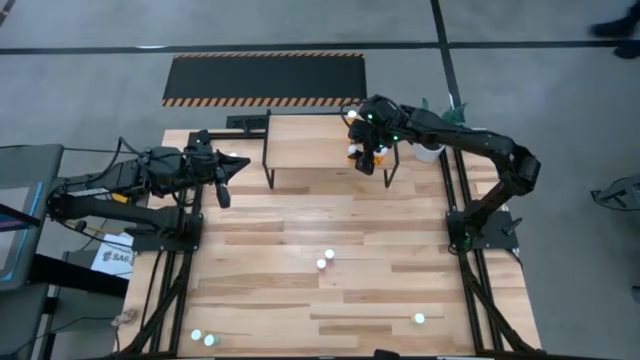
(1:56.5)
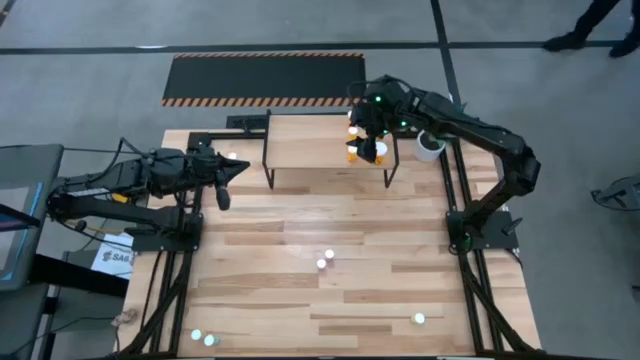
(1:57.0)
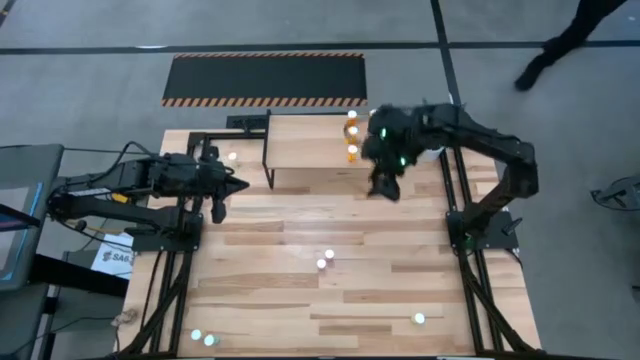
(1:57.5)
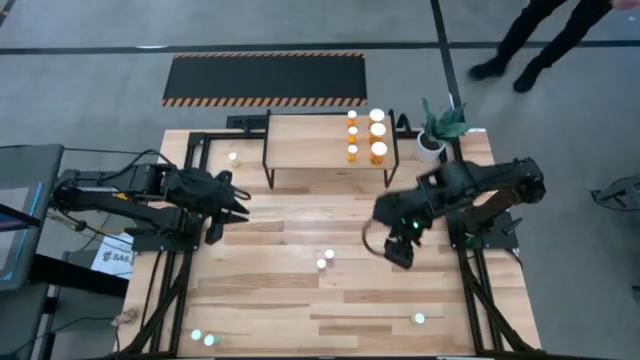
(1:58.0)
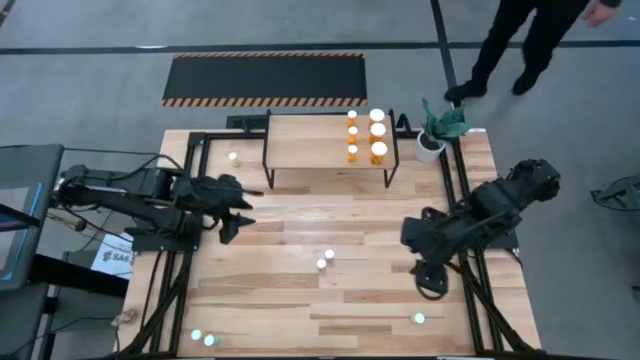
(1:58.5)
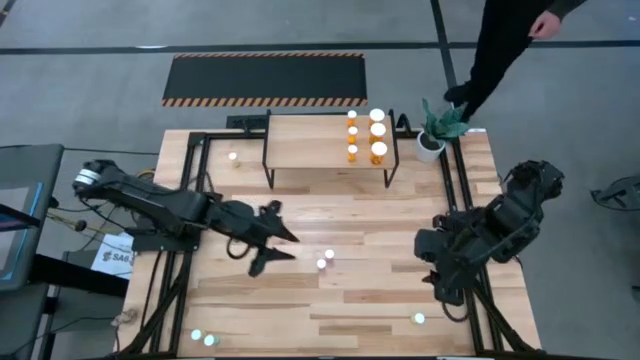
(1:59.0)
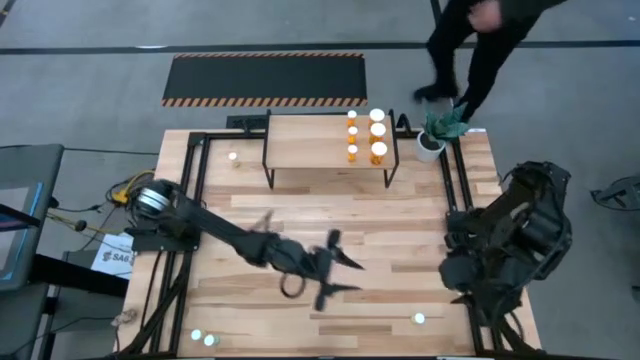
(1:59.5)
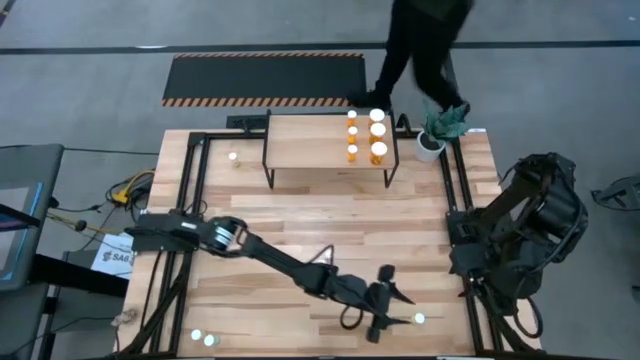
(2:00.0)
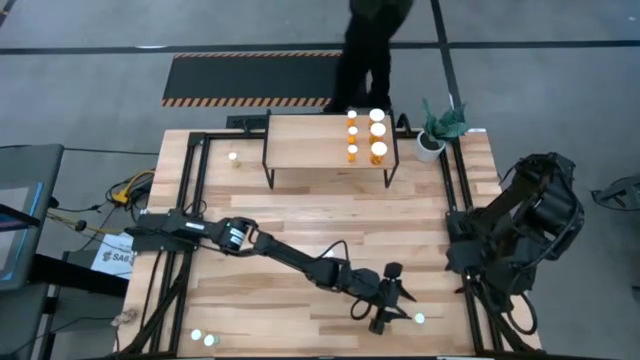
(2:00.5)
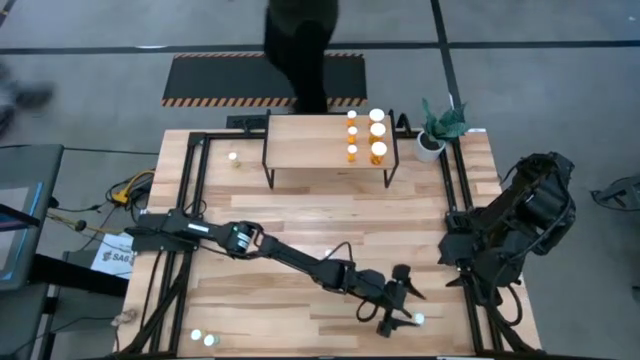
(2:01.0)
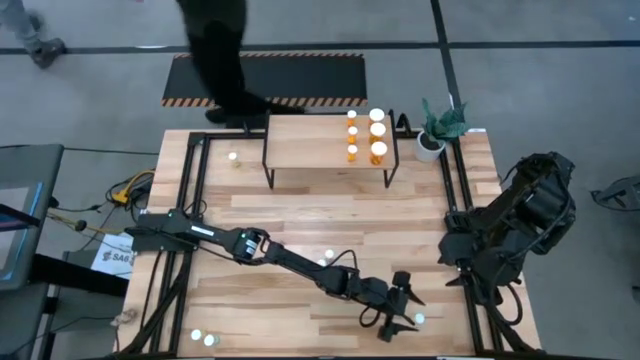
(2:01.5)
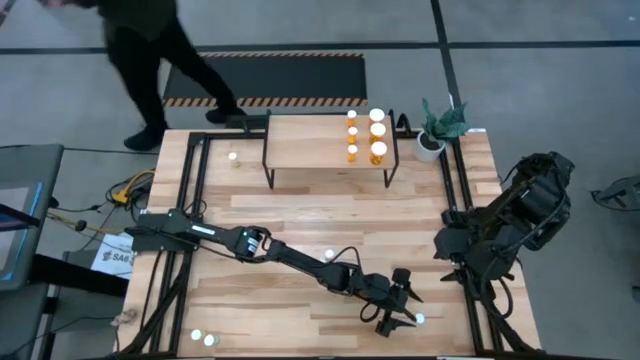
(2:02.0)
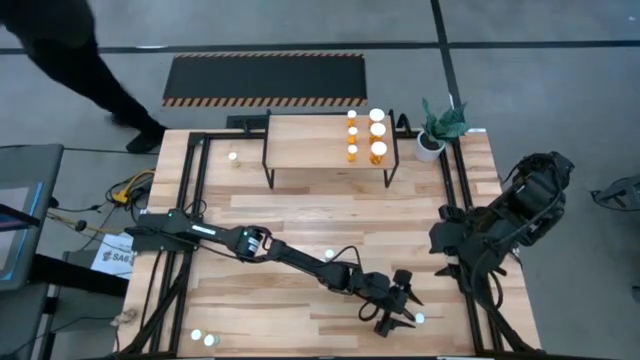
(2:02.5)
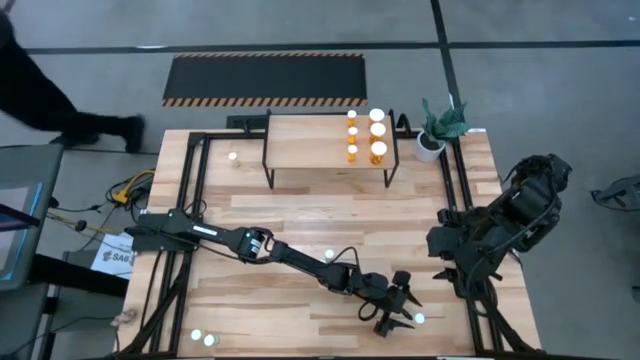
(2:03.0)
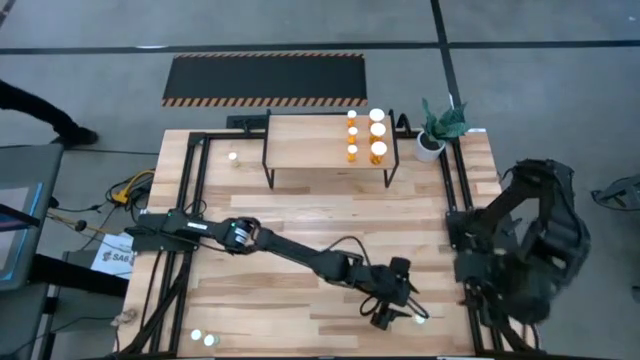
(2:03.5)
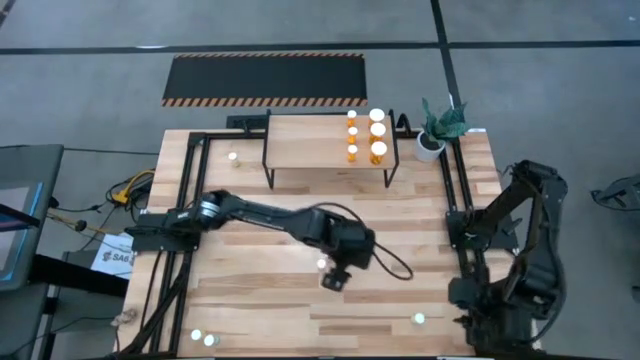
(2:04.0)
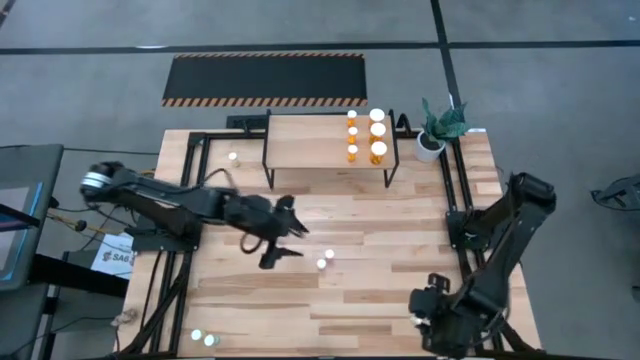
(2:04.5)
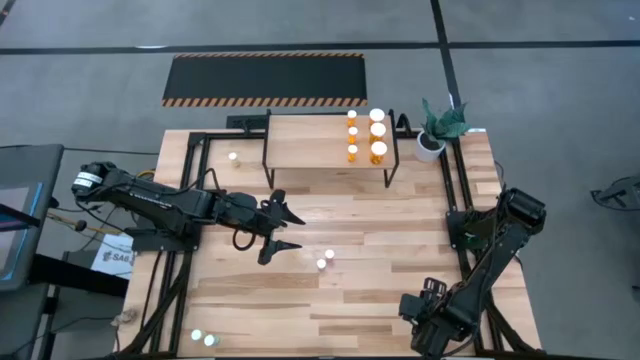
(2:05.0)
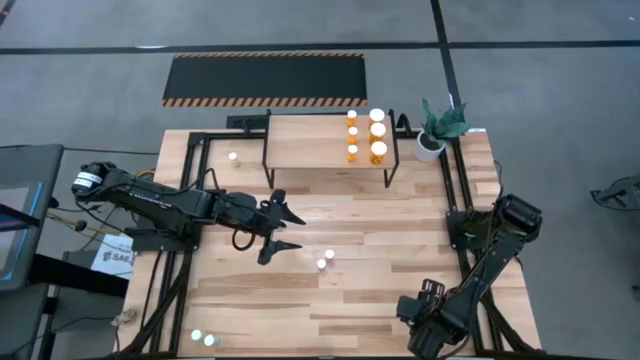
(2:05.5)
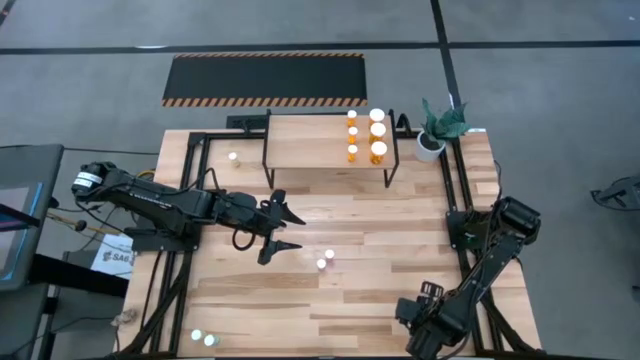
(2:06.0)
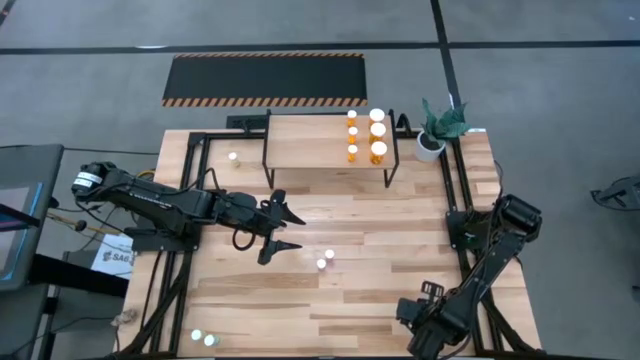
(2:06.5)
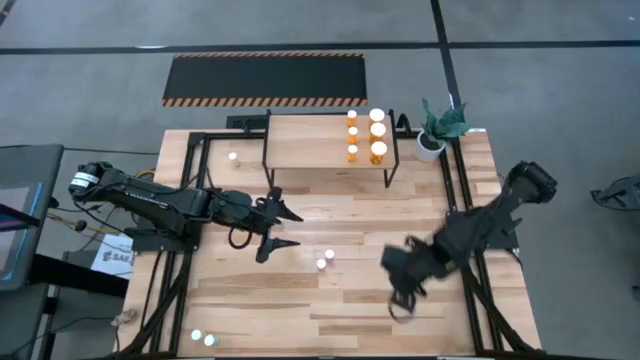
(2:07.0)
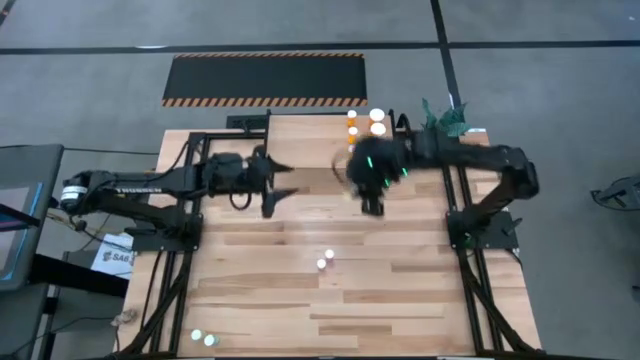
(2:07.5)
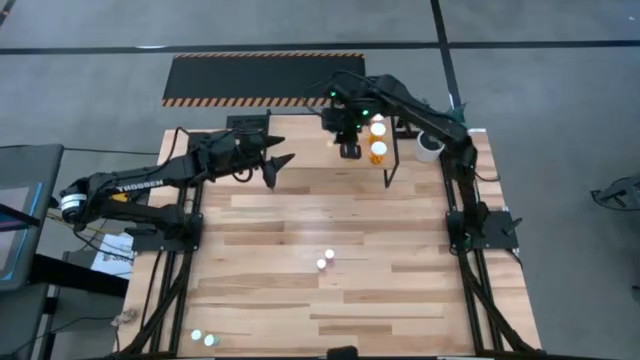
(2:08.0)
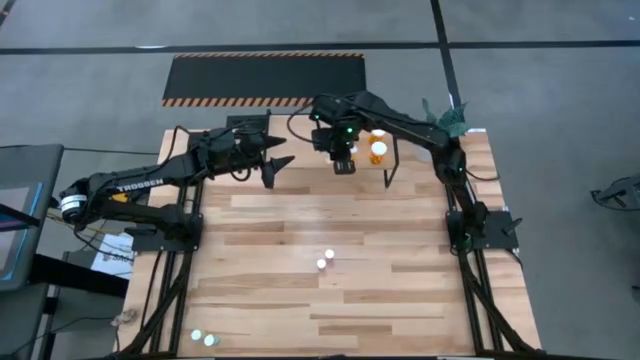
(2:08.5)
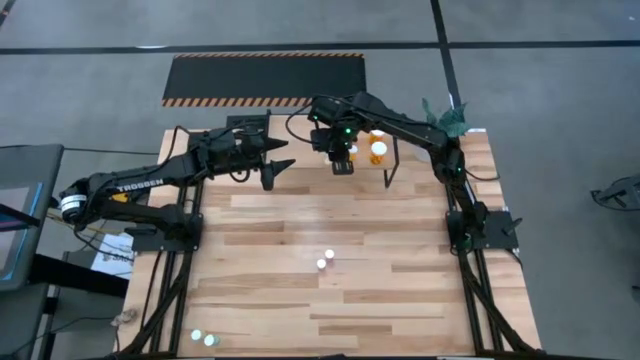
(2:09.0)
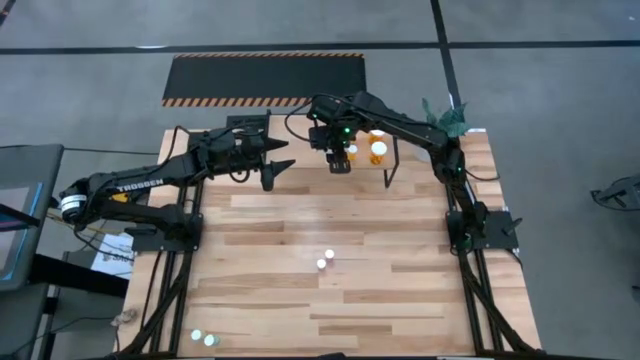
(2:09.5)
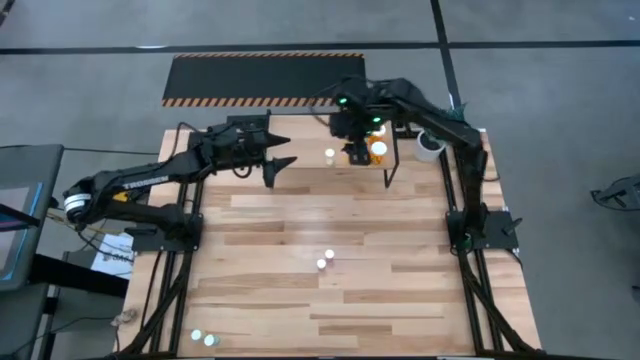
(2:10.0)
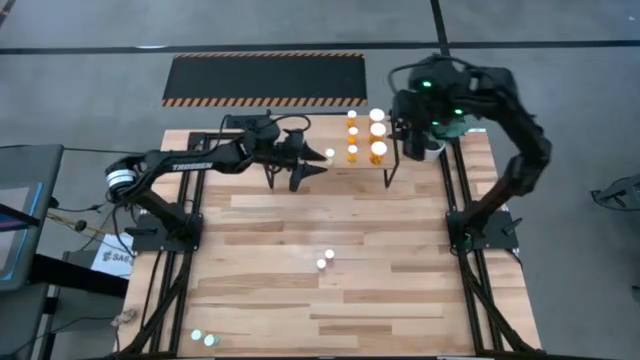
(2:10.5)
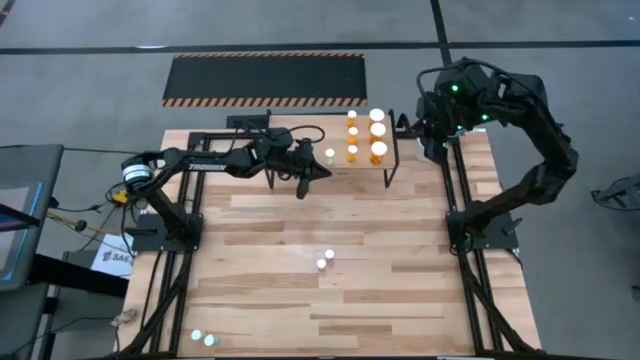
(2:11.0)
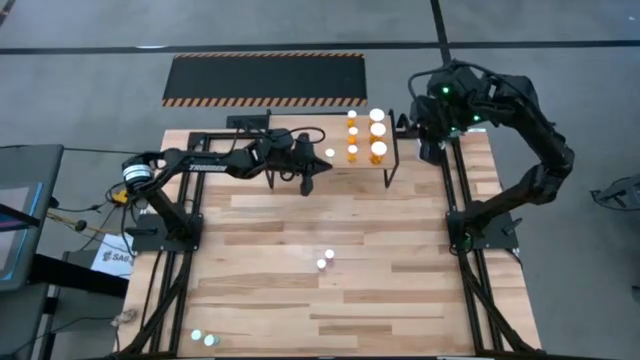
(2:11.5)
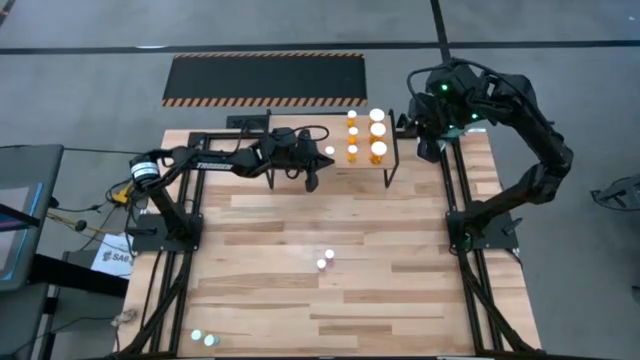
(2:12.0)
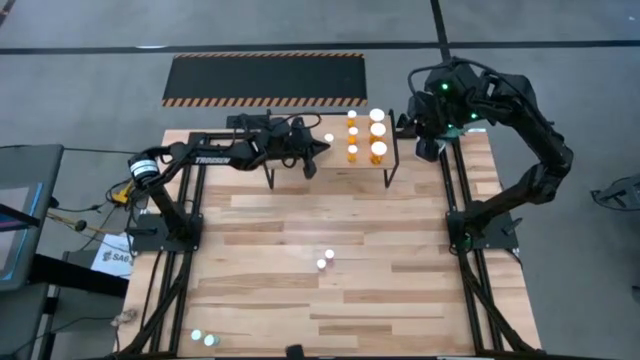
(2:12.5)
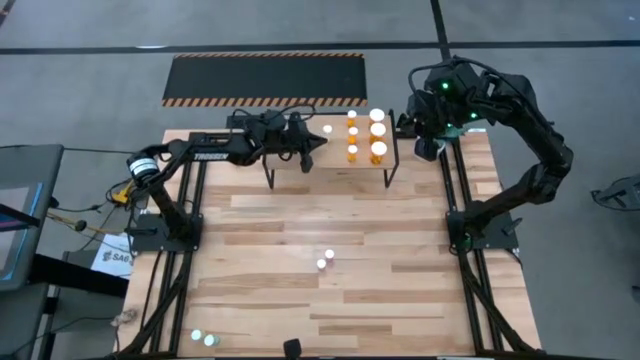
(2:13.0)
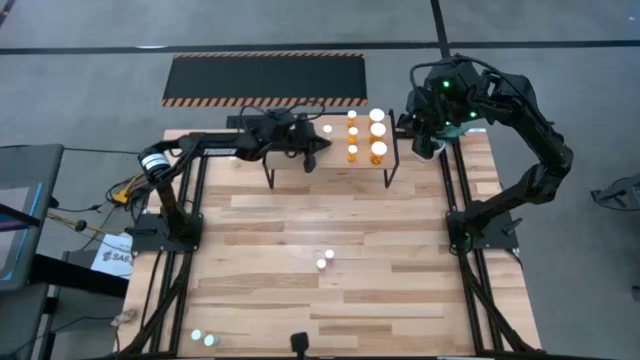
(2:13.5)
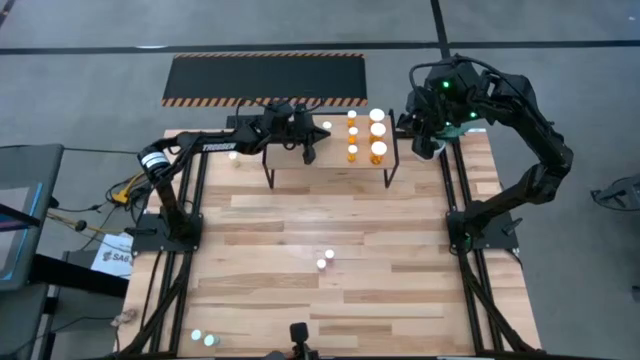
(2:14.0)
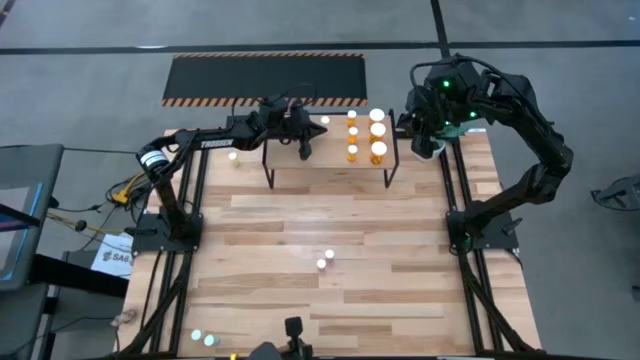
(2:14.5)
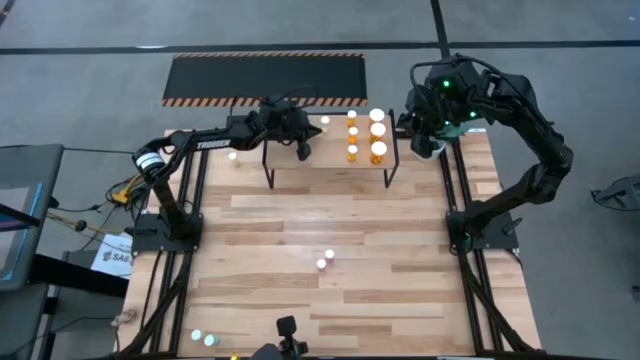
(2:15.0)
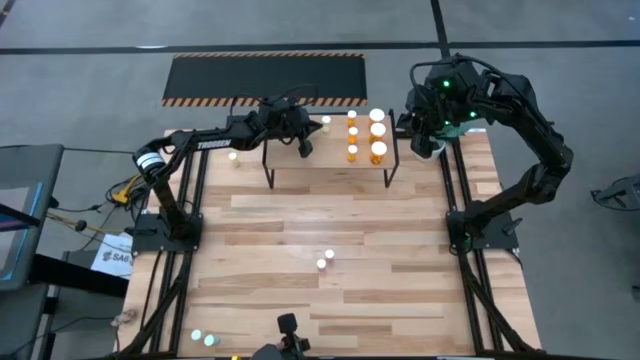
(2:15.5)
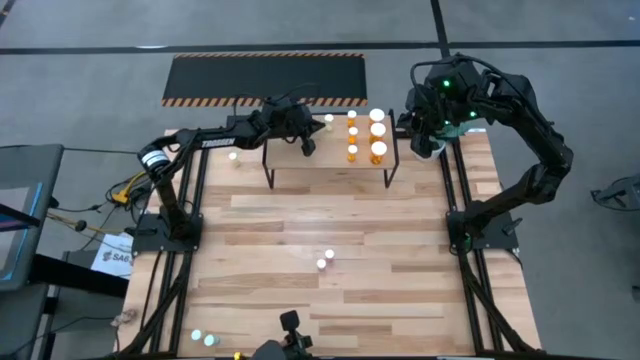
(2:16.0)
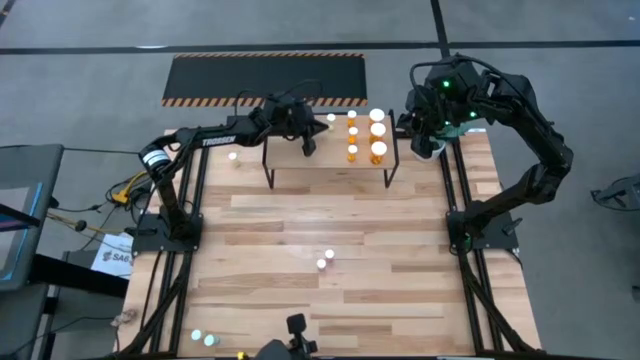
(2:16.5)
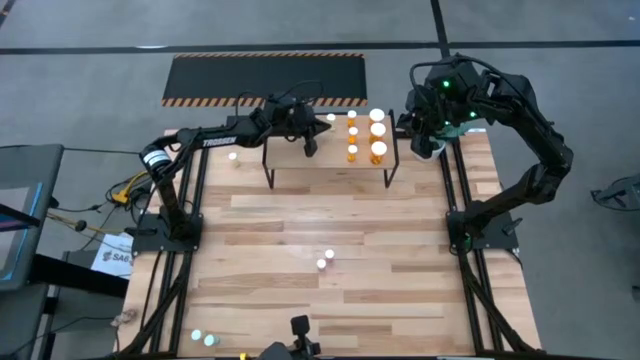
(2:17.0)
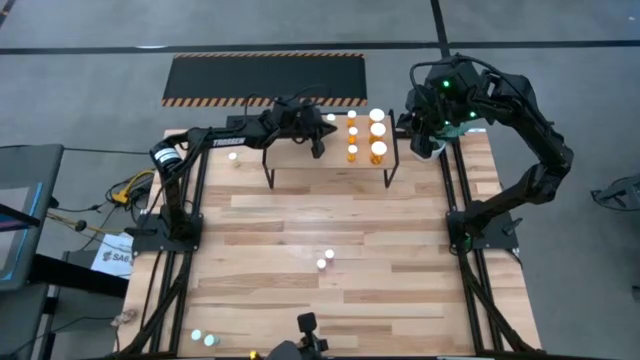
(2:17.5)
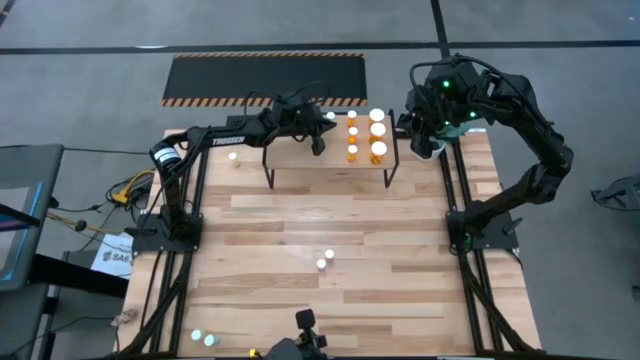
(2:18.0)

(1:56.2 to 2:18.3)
Task: Pick and place medicine bottles onto shelf by color
Put the right small yellow pill bottle on the shelf
